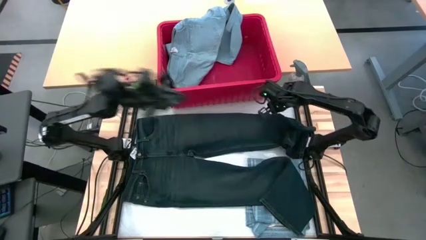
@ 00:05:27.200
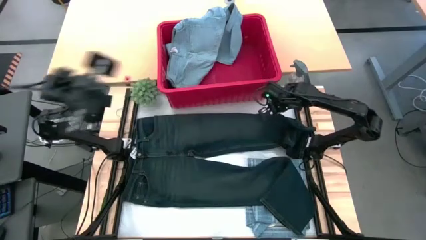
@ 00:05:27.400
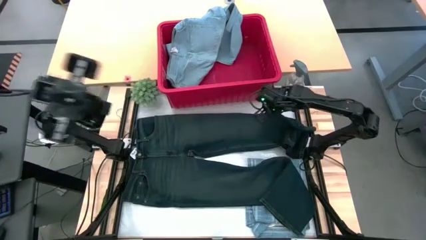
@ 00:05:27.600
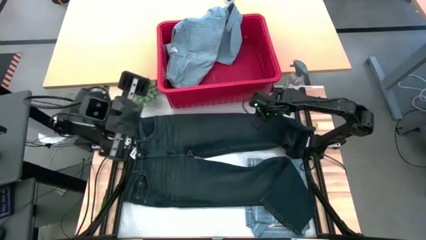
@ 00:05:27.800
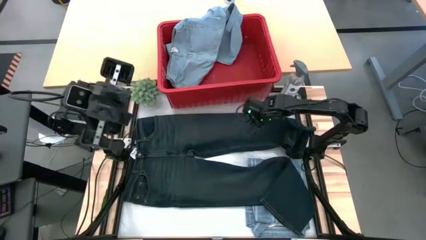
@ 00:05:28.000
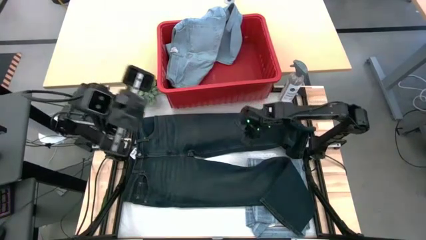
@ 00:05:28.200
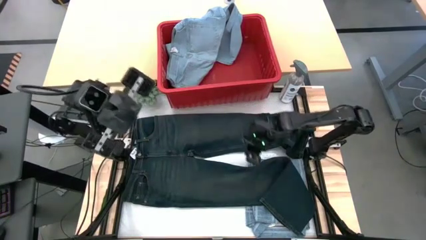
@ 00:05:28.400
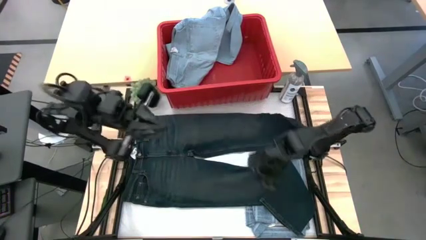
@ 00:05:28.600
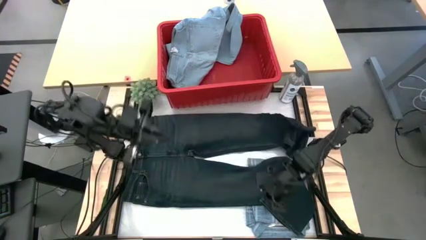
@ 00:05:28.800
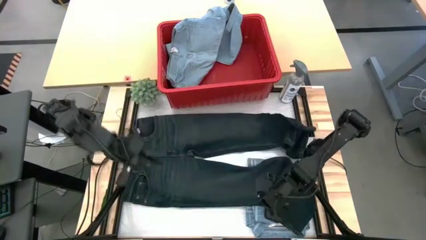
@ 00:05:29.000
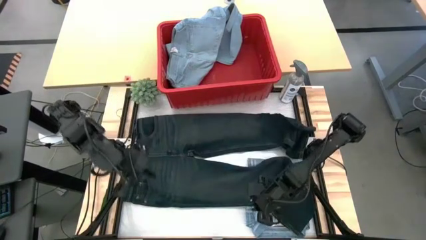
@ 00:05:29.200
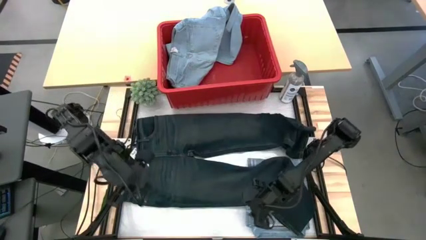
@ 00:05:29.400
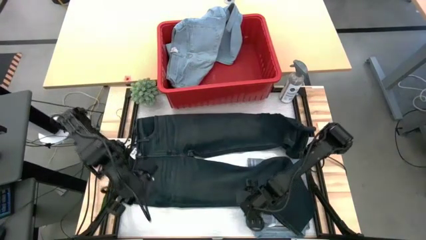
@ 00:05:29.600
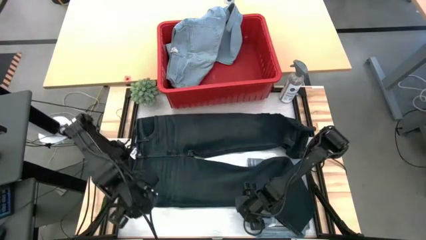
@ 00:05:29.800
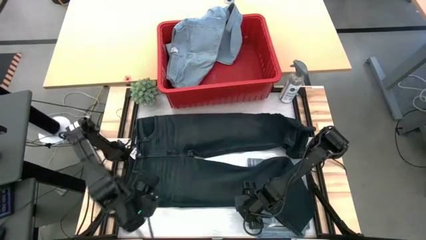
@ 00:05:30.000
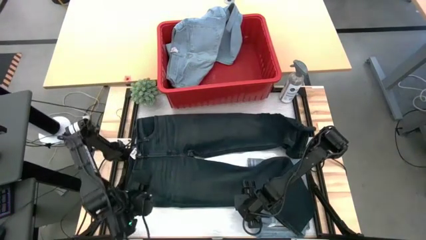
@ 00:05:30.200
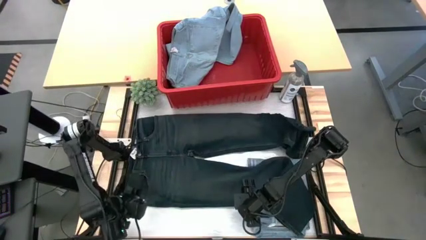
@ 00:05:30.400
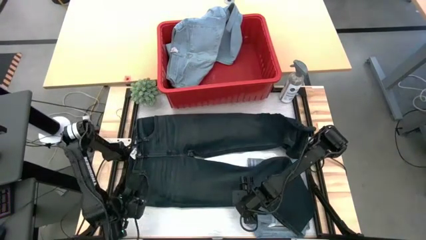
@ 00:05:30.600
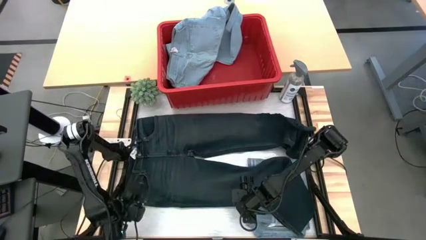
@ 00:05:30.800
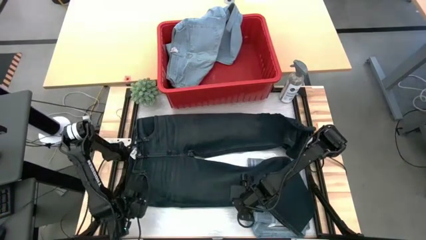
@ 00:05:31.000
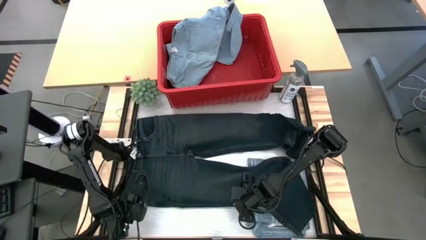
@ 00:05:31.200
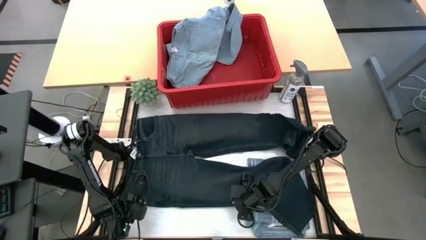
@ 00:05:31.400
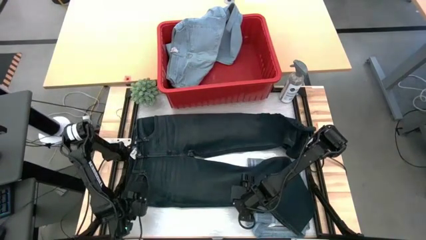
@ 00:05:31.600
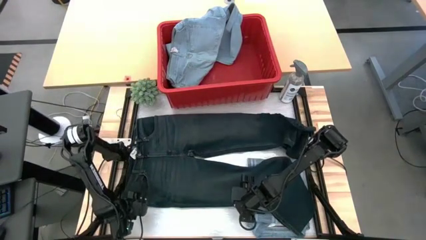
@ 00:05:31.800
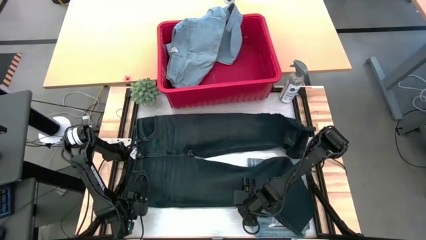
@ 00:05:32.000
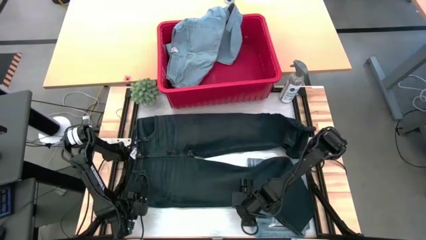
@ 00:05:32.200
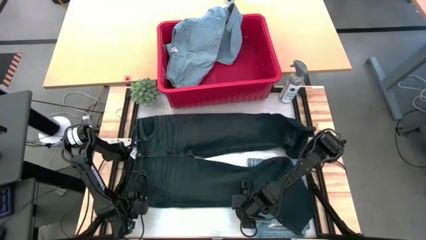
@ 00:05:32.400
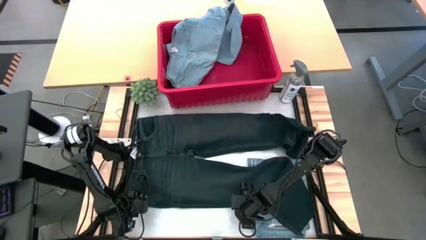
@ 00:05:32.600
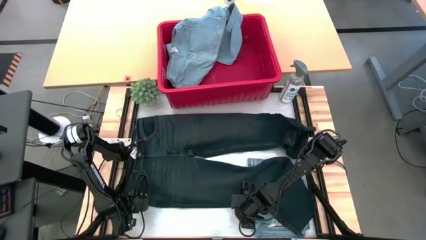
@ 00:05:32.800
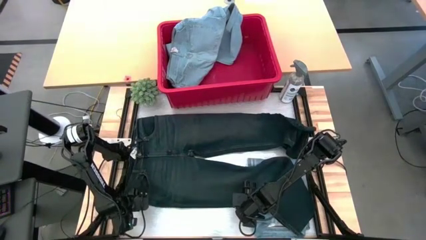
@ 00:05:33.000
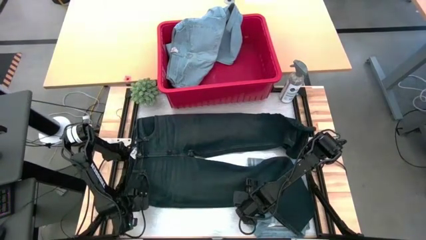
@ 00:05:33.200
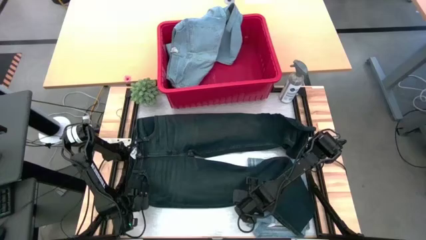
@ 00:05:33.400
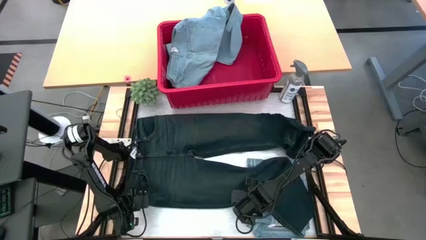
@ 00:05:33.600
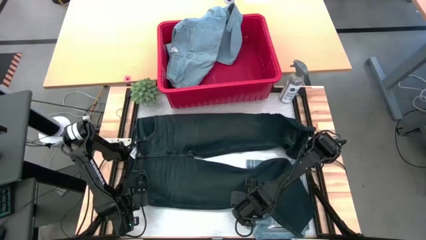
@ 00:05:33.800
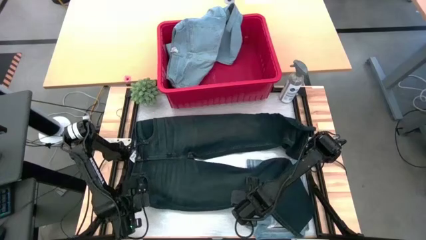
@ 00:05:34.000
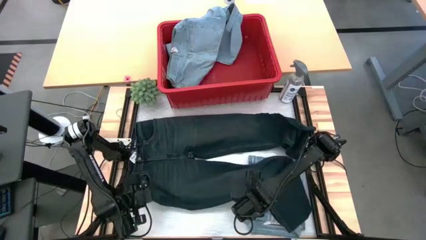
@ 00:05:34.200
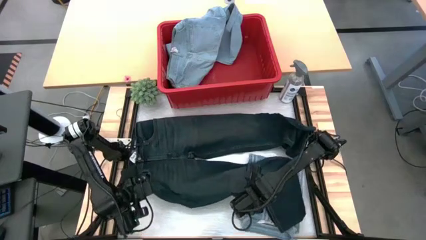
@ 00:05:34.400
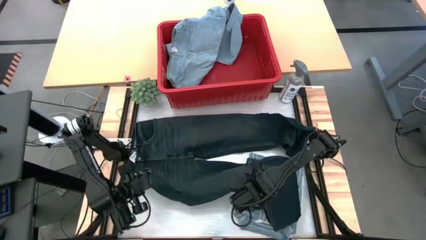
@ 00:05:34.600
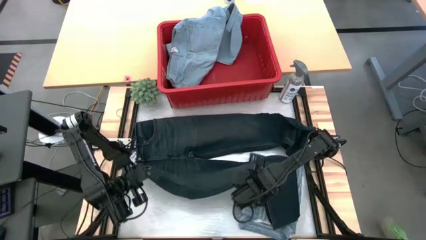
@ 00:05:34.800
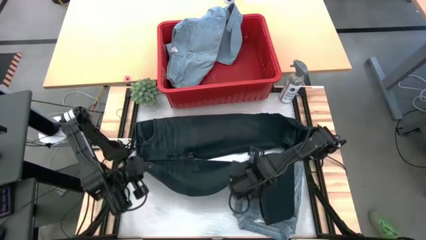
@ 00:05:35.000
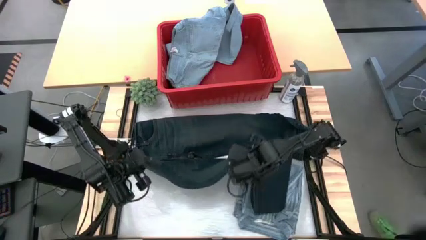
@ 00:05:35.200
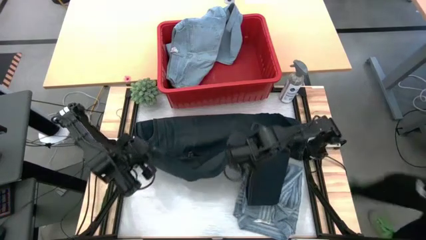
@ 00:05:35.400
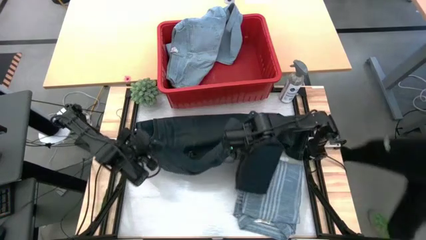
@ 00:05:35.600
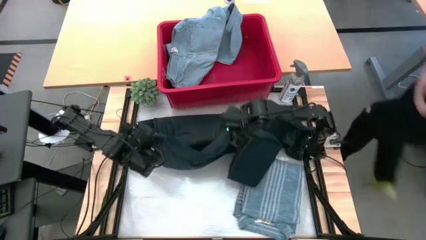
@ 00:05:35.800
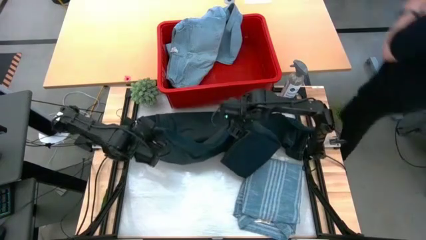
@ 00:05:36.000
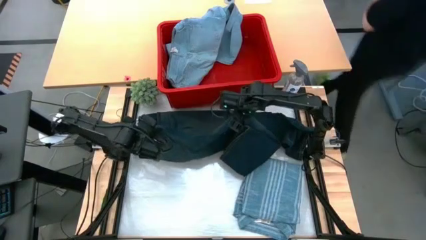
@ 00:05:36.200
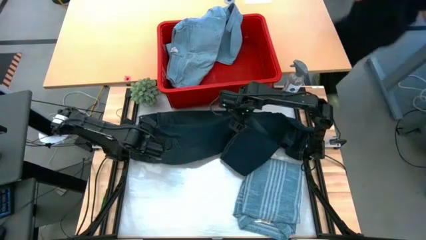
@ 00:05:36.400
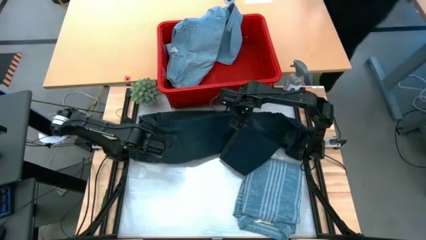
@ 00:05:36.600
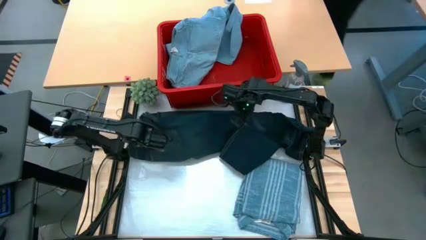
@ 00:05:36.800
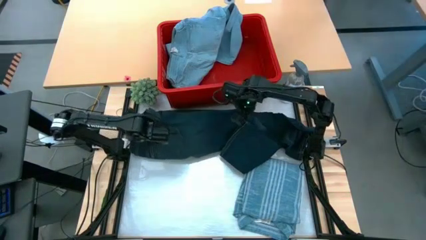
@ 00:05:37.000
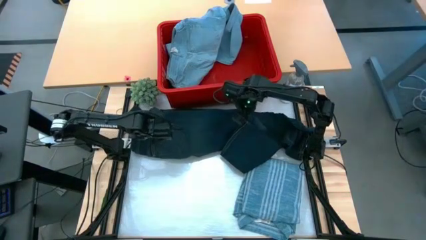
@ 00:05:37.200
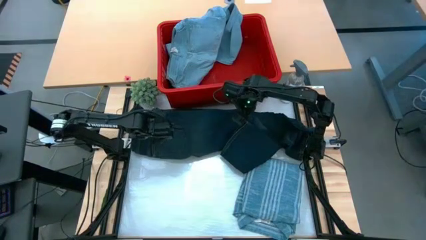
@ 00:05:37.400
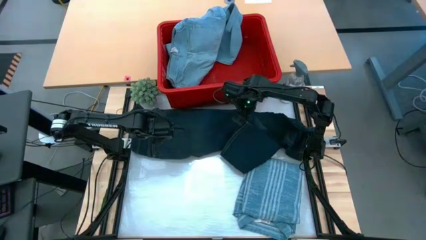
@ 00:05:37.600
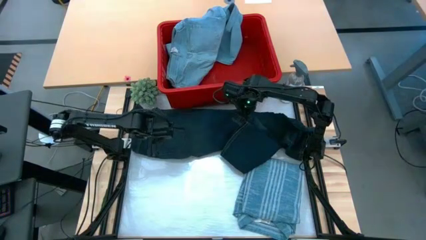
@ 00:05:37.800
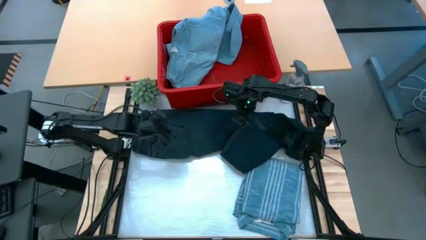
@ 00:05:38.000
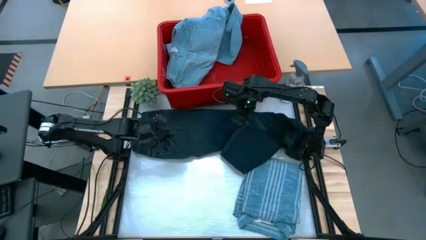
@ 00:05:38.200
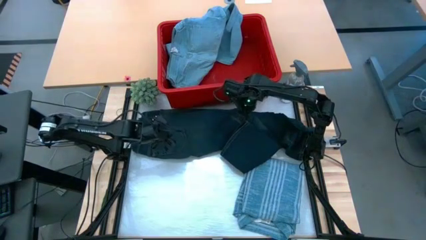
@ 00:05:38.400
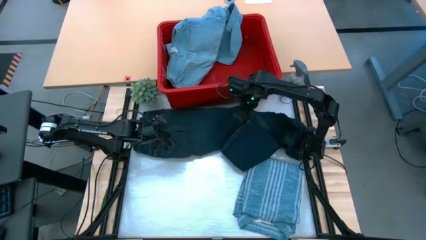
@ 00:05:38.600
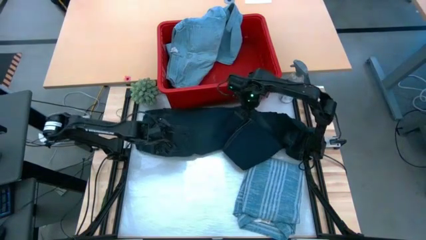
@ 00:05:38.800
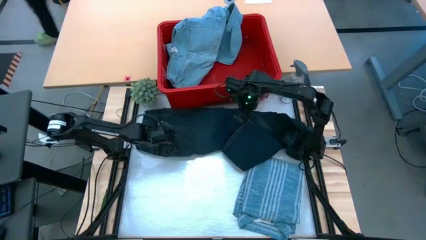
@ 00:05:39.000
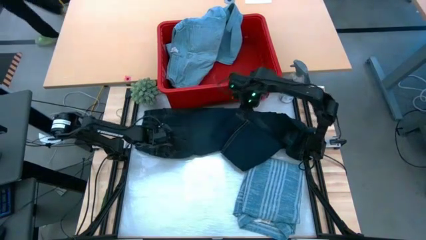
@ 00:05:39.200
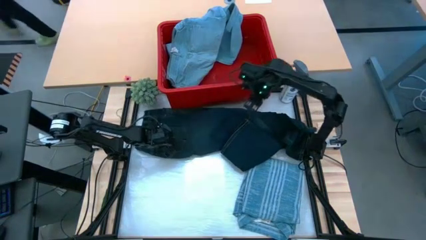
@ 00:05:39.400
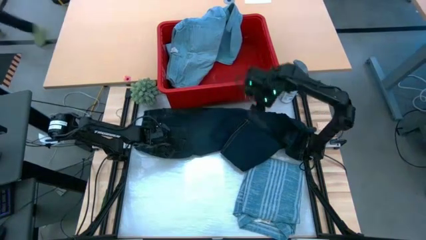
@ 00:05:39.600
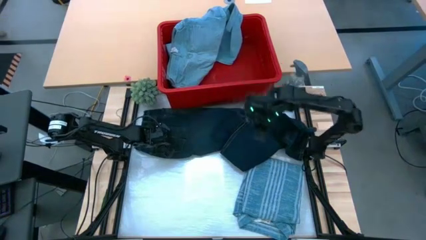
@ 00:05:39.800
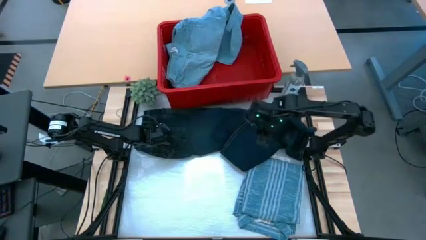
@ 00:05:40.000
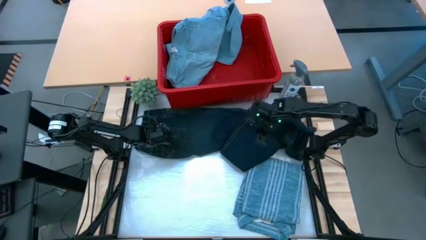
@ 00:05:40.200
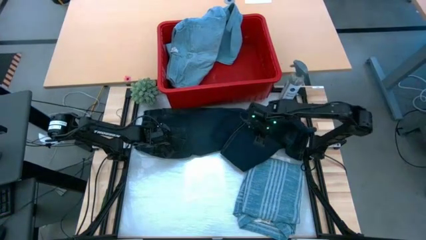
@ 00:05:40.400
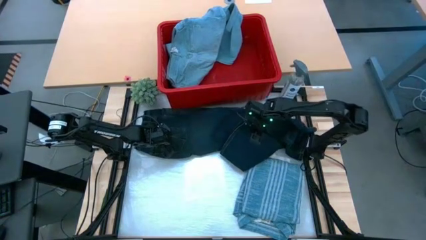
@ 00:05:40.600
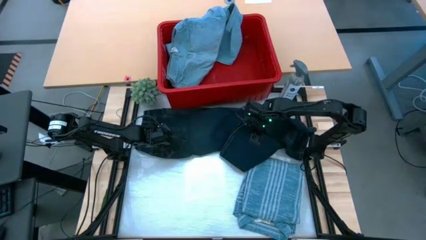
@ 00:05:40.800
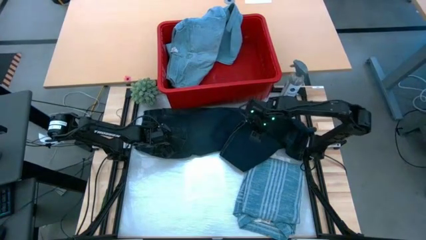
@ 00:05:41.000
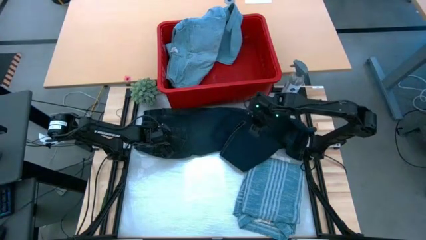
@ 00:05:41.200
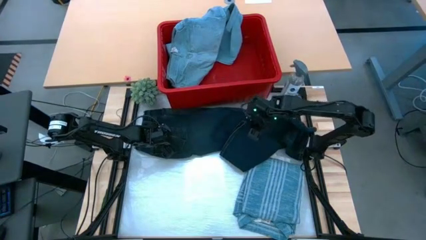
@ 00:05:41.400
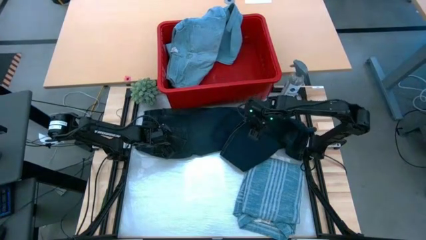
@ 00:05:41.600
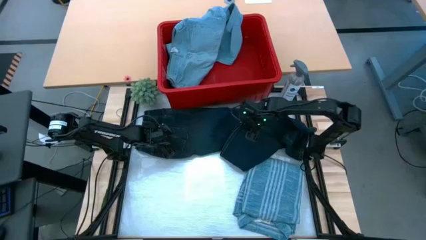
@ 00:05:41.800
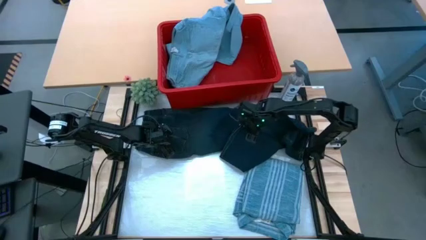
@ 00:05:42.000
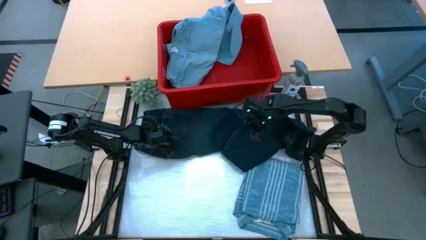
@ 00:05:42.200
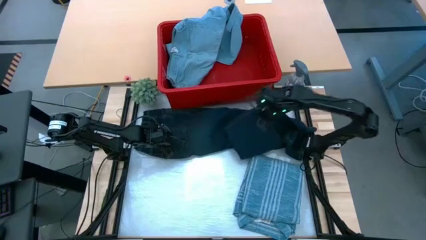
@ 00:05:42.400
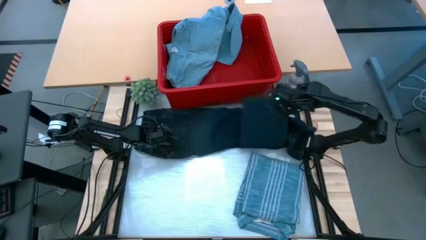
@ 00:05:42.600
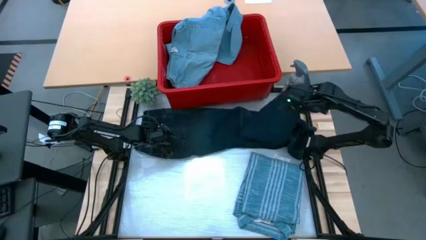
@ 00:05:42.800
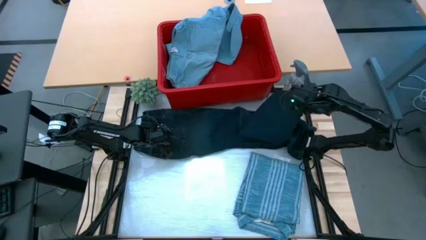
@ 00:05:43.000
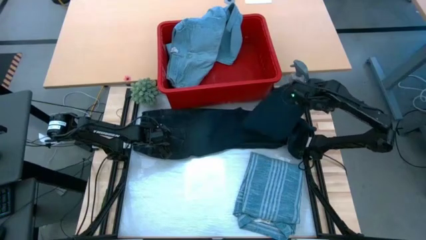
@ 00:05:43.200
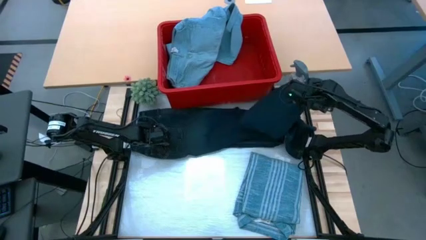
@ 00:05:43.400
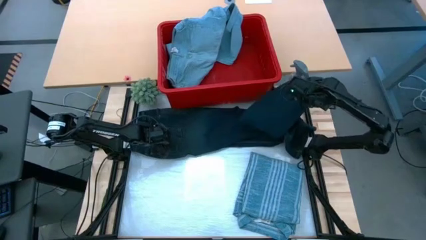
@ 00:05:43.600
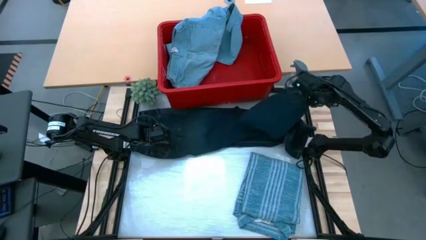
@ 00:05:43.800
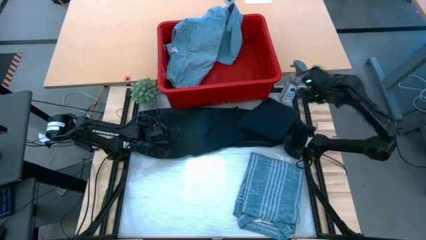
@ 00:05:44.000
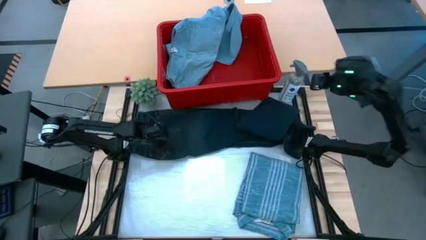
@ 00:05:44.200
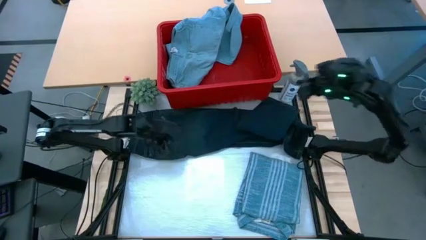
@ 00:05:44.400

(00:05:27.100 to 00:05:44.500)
Task: Fold Laundry from Bin
Fold the blue denim pants
